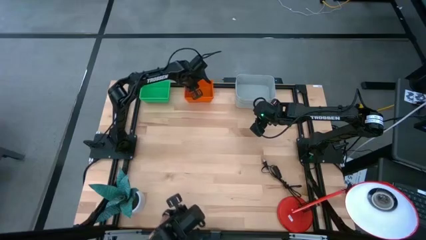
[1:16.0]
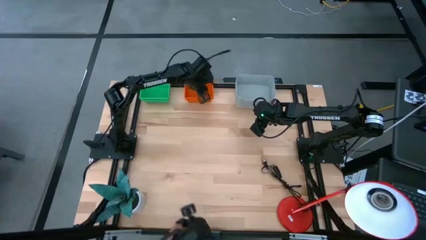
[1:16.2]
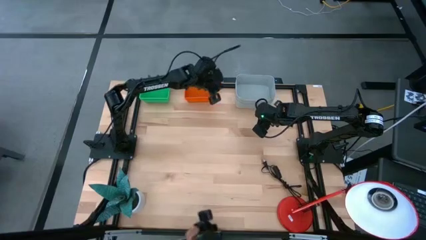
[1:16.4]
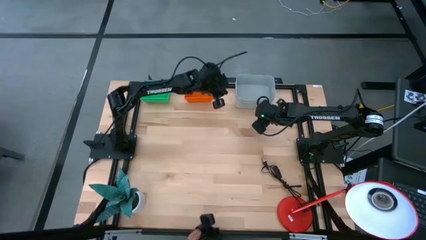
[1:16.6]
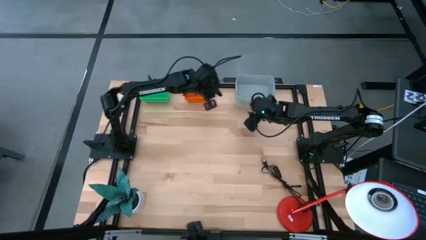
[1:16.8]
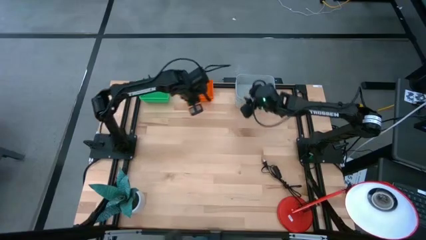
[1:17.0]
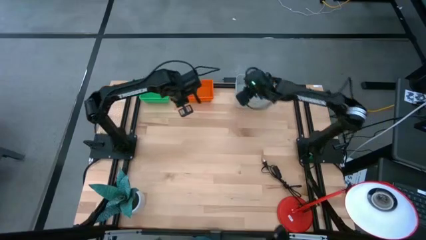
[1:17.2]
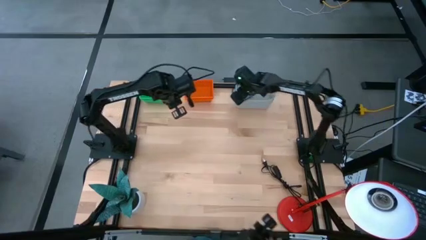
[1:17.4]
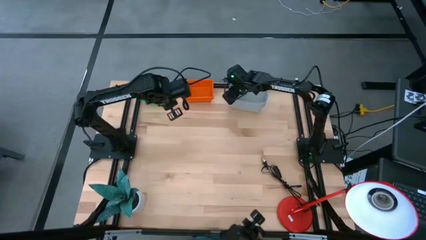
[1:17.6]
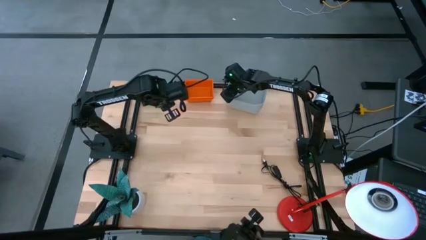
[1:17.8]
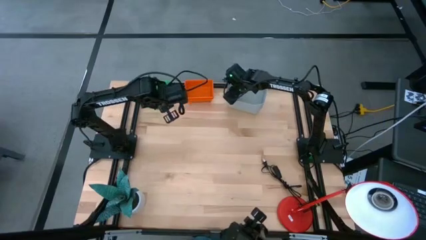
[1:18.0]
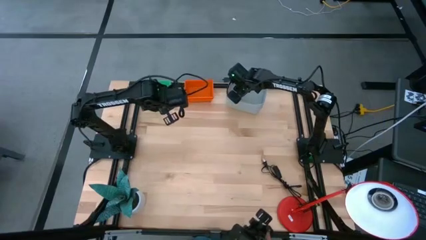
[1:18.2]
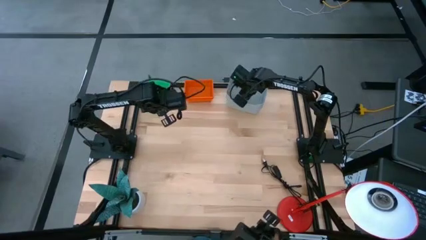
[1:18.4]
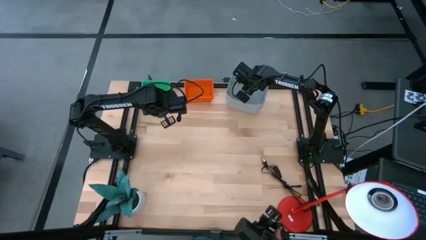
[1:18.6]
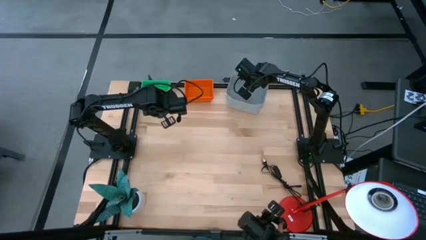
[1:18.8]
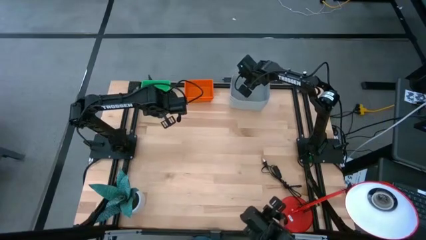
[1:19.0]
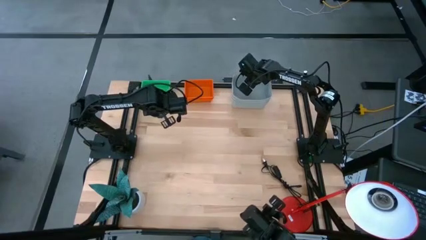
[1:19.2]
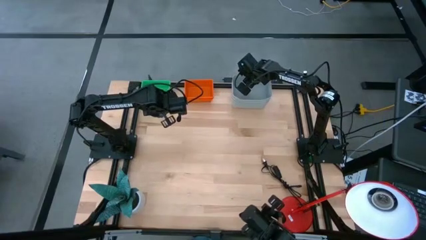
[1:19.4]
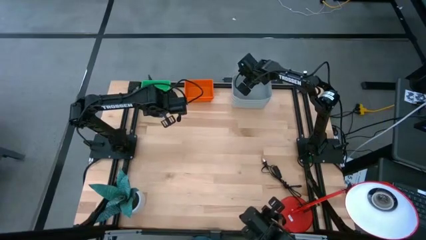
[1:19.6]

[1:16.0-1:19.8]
Adjust the gray stacked bins

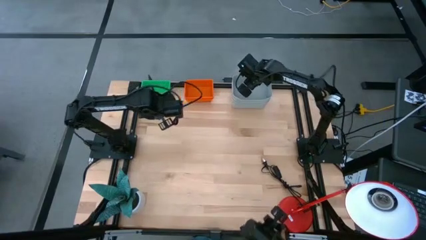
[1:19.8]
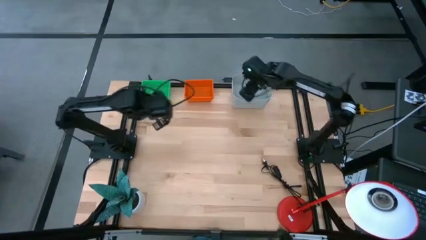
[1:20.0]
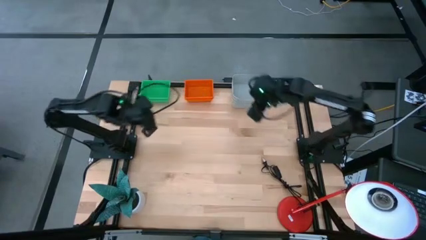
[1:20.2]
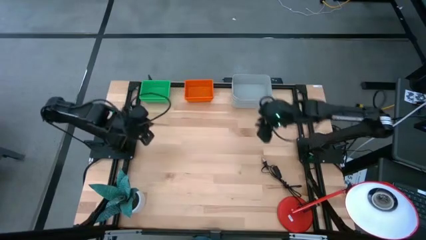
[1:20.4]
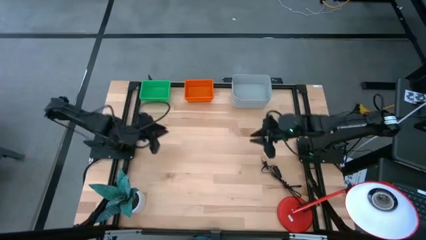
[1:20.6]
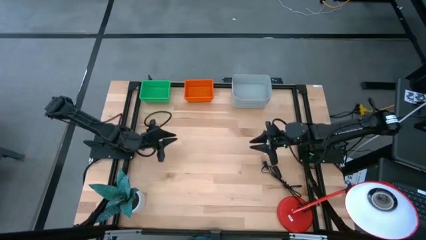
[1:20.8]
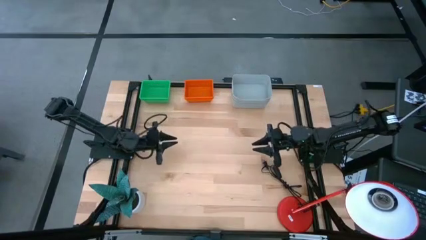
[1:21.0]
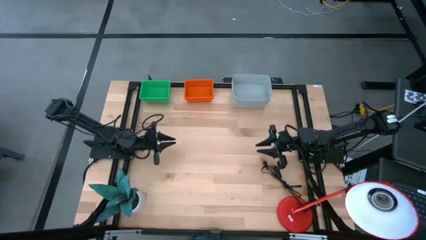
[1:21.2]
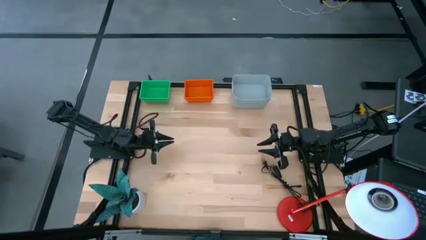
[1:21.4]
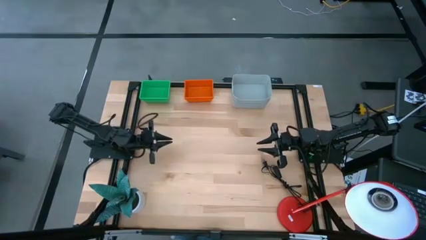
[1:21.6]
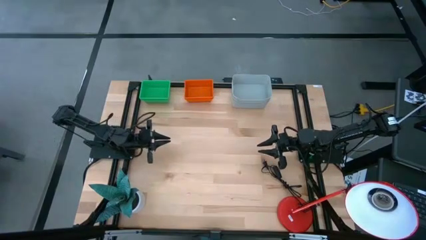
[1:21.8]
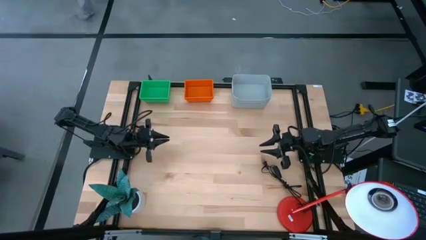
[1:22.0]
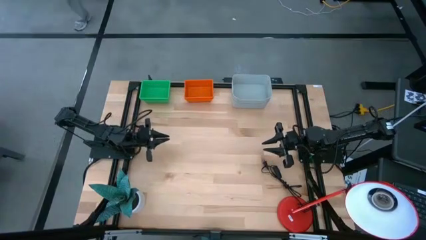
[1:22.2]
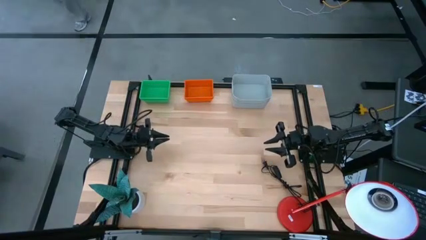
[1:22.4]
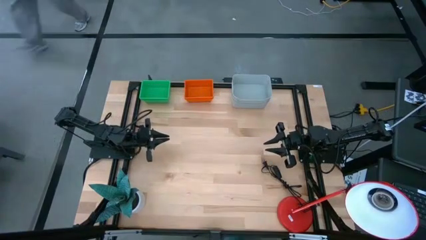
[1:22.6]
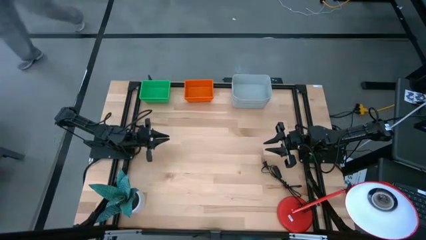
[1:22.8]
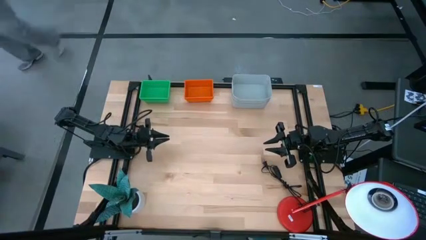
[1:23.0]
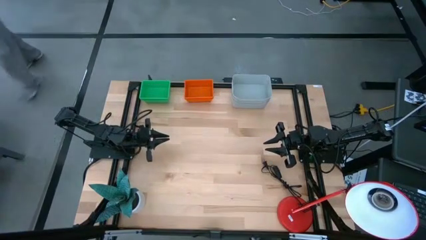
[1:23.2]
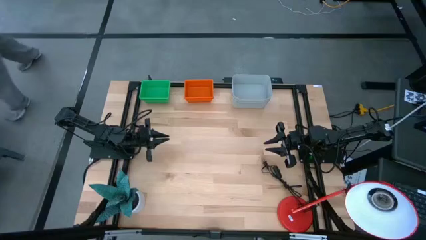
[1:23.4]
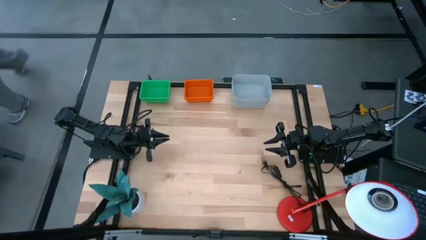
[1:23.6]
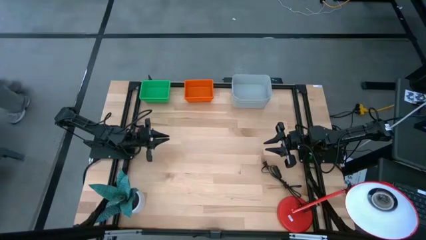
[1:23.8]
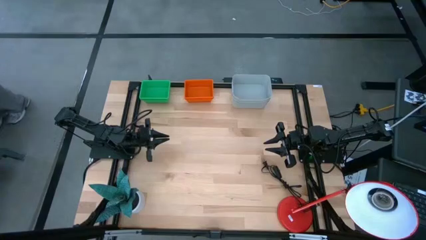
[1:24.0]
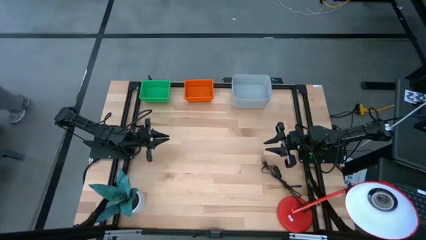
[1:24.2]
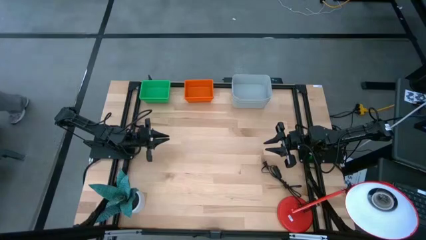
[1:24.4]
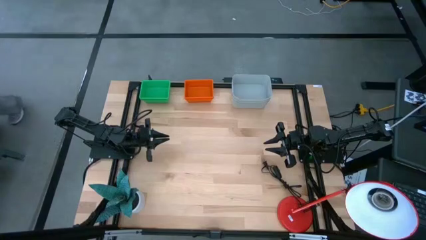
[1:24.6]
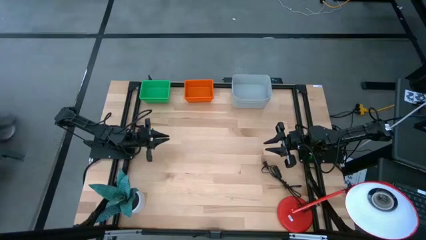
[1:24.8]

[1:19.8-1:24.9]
Return to Home Position

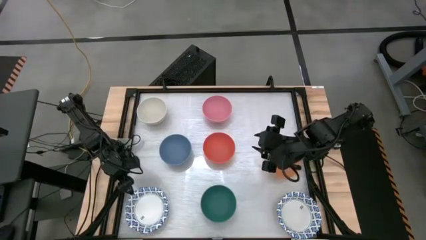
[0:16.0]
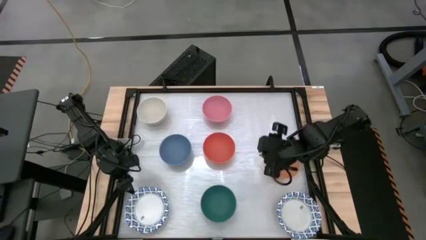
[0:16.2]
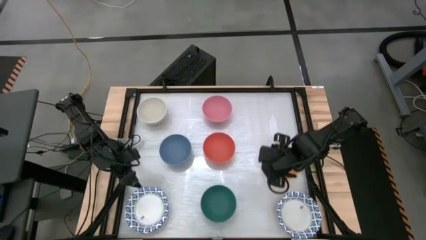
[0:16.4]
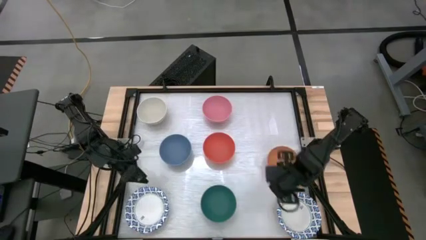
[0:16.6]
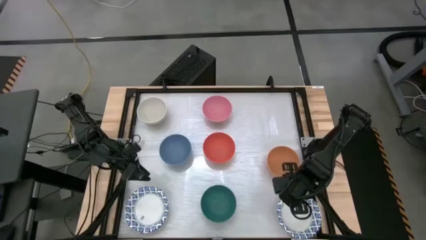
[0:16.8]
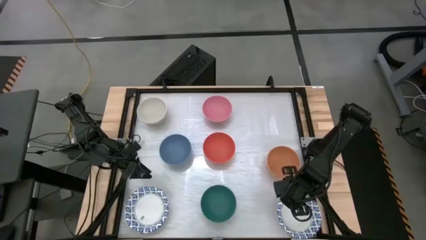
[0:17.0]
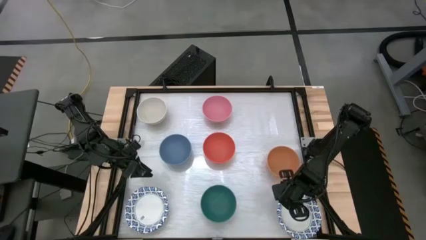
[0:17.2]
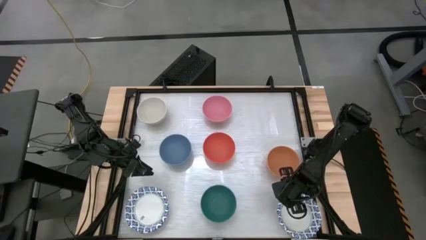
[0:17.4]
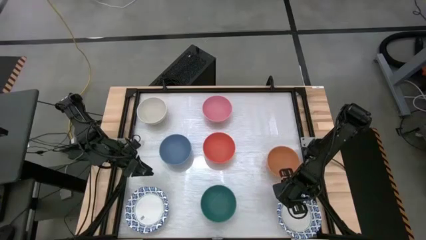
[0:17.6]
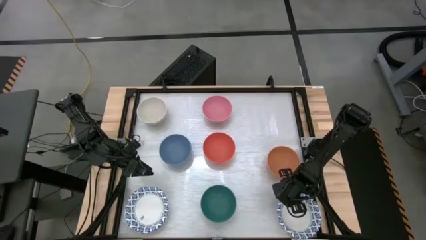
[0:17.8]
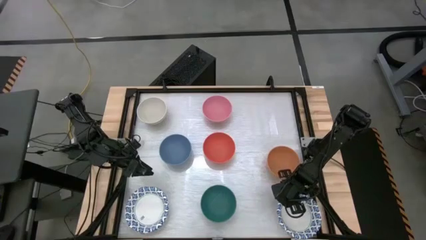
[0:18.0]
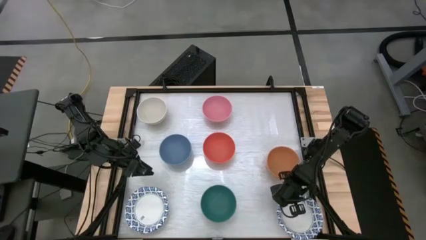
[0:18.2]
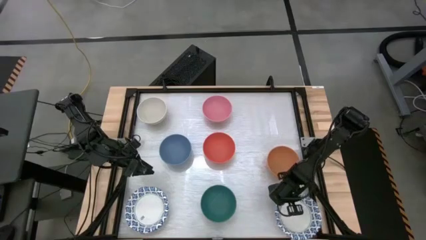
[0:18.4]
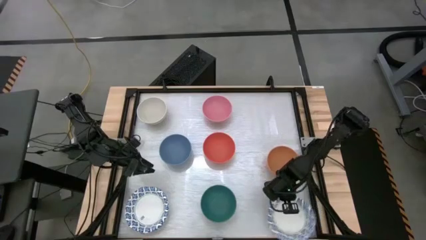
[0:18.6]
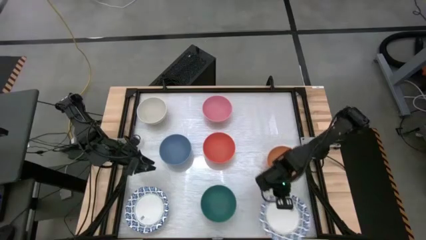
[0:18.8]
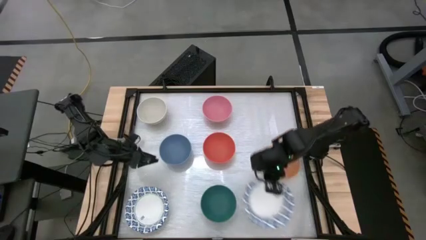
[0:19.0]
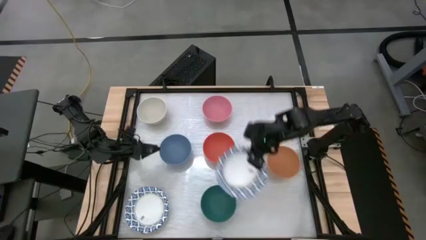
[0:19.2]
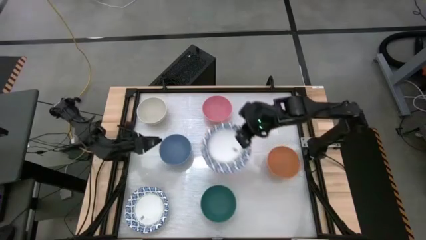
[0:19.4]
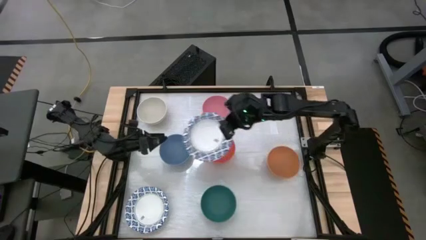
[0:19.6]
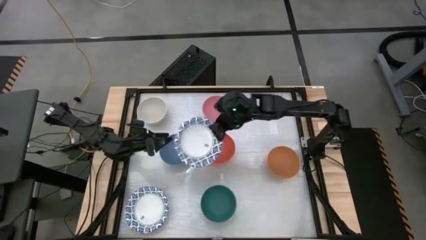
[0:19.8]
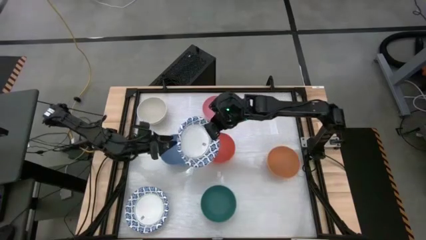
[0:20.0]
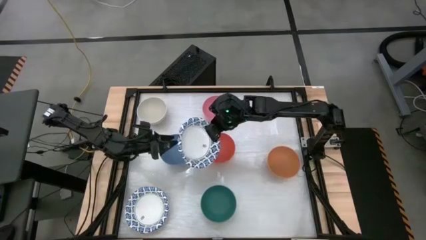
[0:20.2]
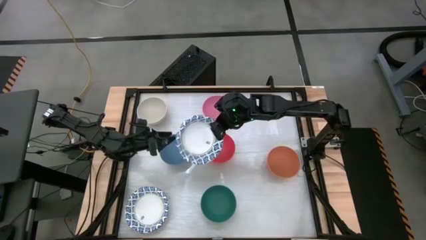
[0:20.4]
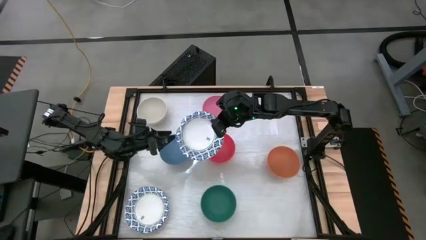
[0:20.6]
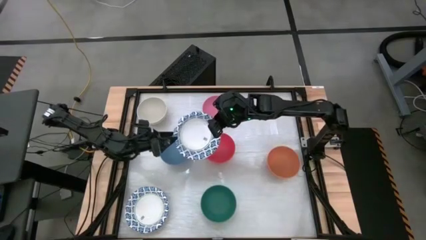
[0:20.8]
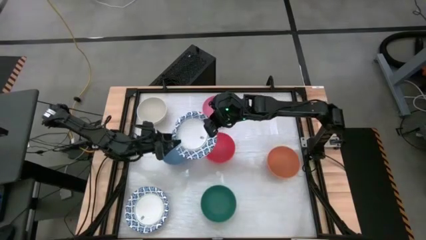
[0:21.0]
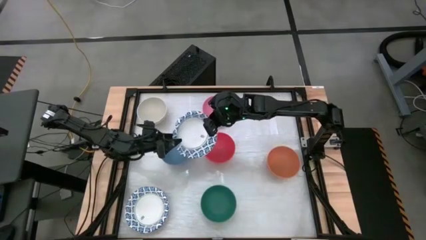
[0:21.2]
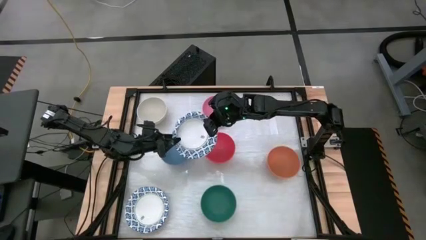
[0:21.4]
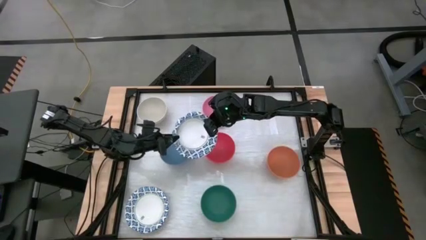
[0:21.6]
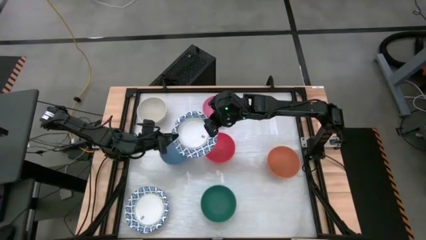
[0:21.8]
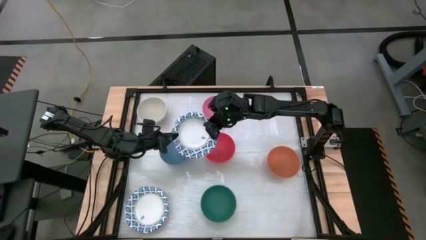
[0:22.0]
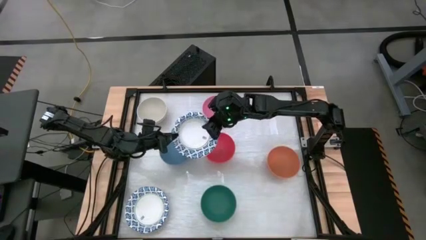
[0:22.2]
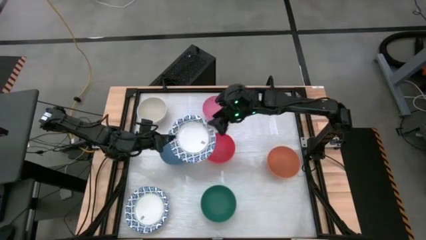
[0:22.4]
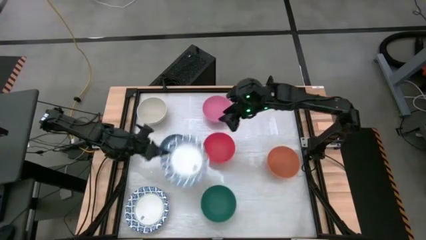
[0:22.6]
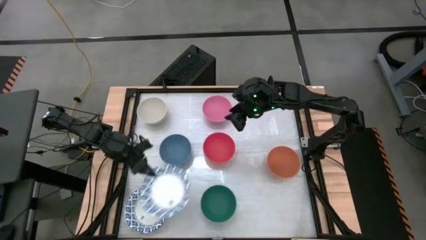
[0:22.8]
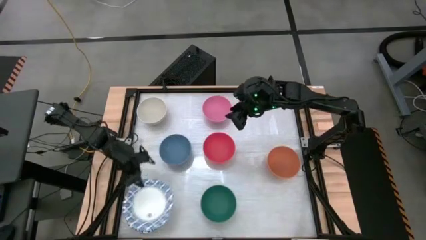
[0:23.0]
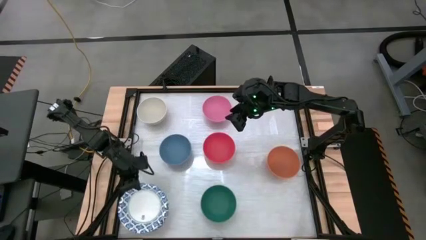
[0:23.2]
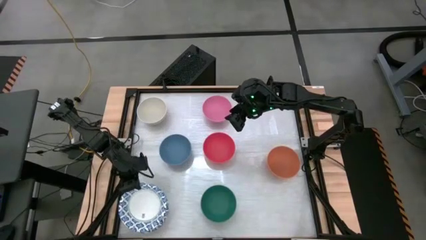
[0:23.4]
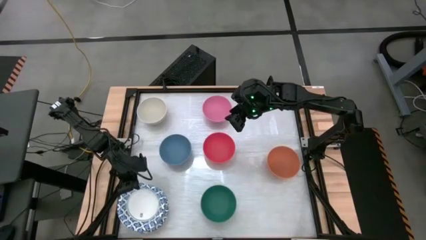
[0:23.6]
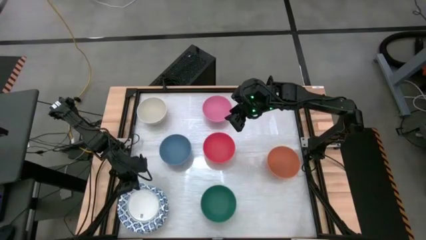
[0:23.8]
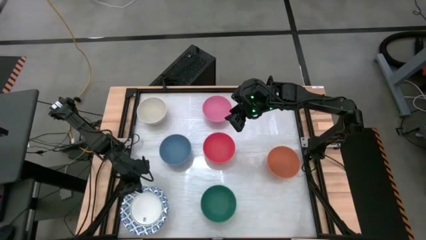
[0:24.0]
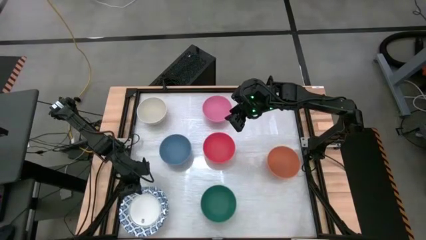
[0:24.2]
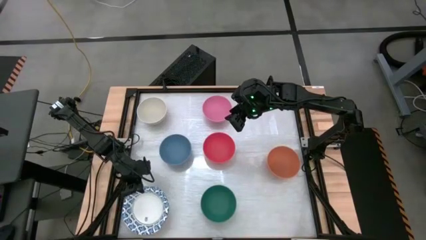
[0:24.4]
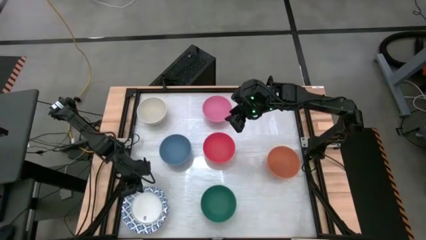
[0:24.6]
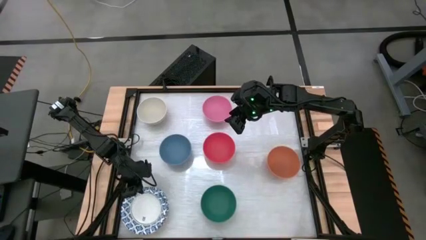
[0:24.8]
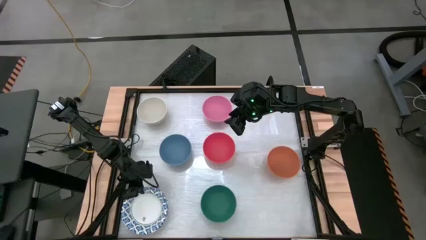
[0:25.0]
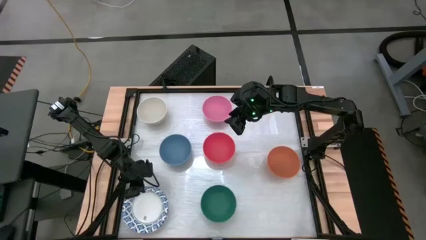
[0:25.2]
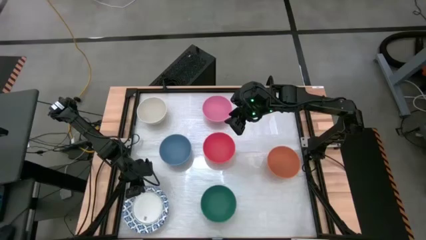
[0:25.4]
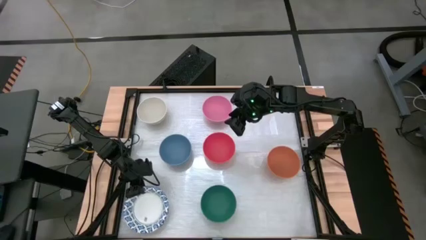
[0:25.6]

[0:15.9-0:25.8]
Stack the right white patterned bowl on top of the other white patterned bowls
